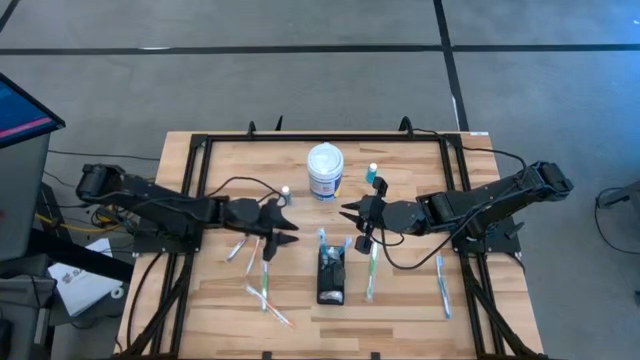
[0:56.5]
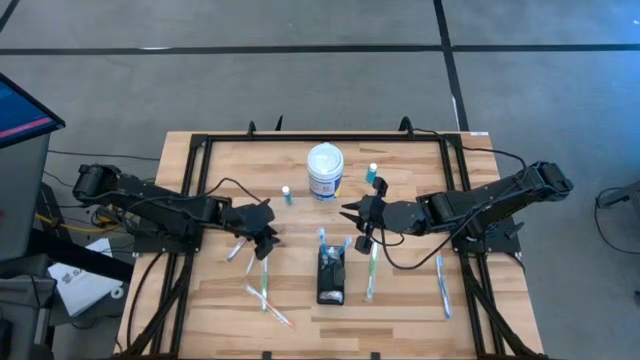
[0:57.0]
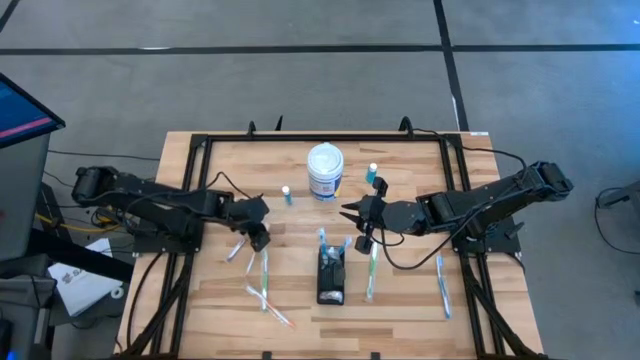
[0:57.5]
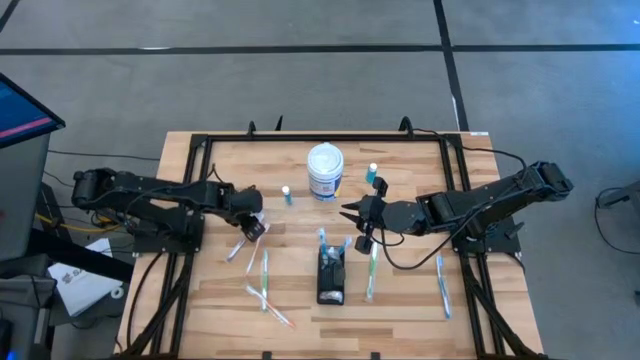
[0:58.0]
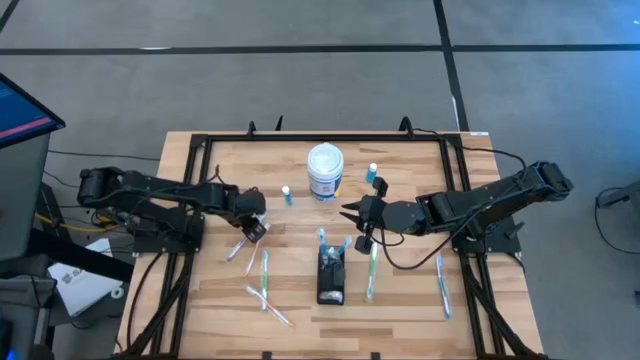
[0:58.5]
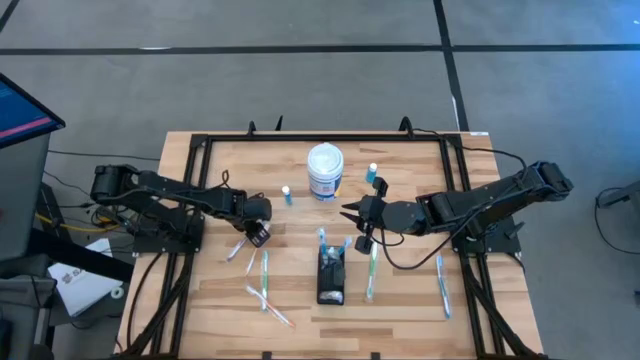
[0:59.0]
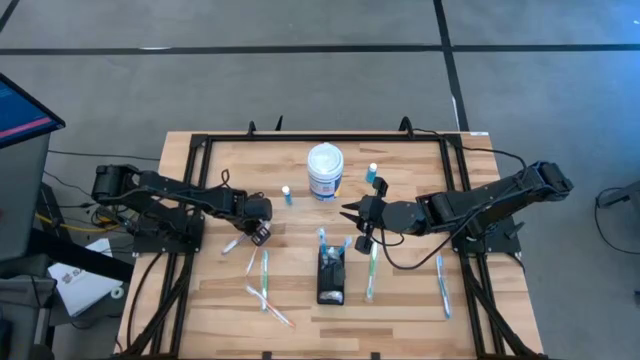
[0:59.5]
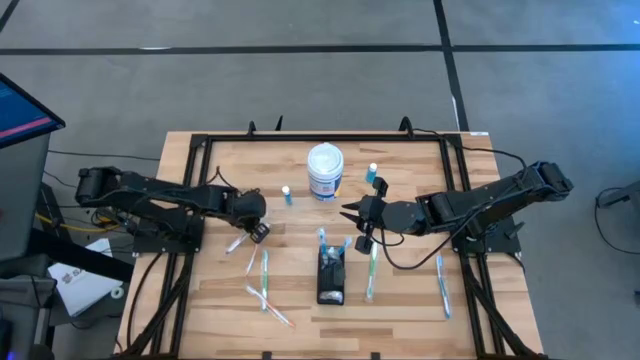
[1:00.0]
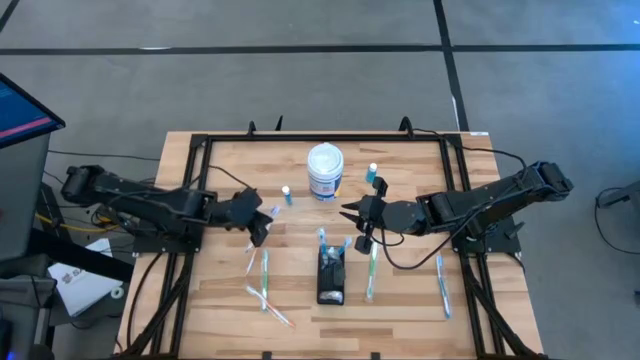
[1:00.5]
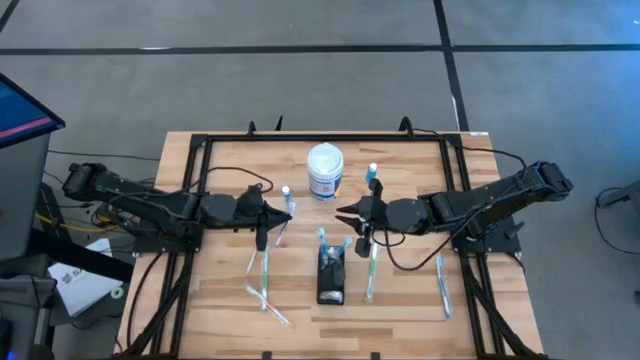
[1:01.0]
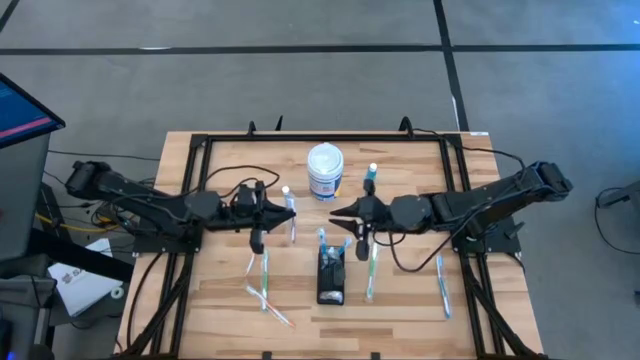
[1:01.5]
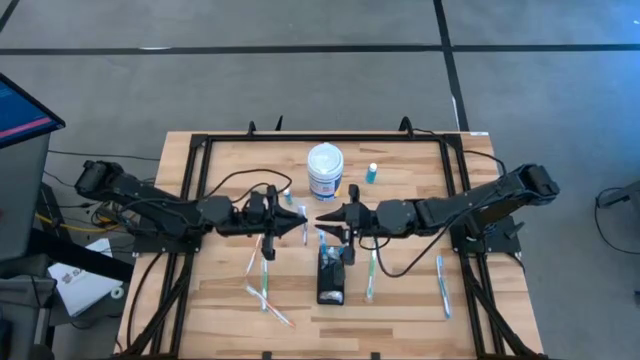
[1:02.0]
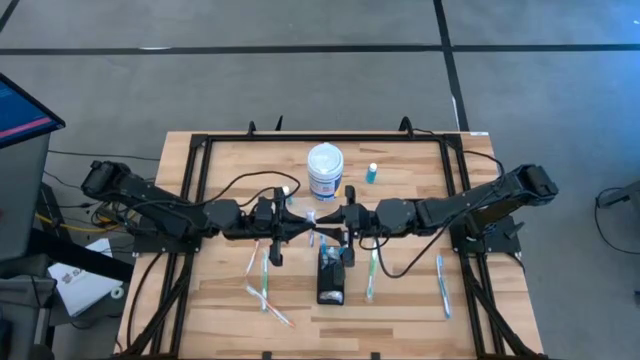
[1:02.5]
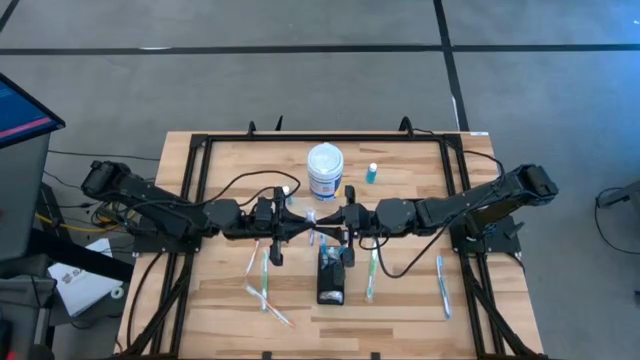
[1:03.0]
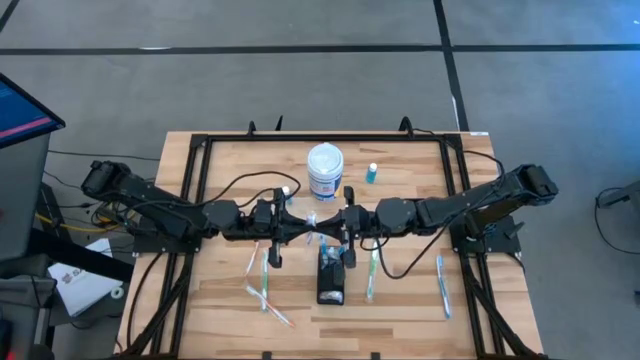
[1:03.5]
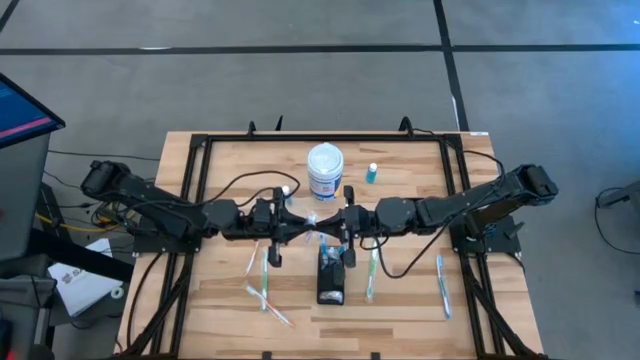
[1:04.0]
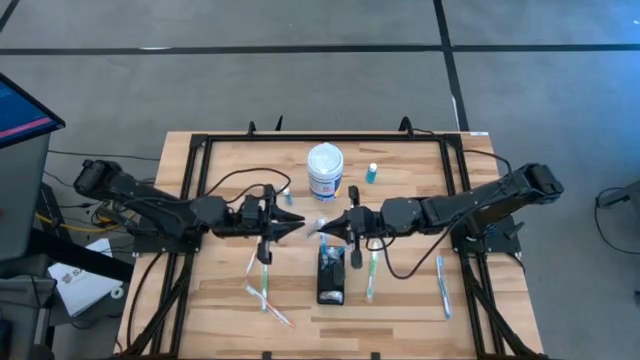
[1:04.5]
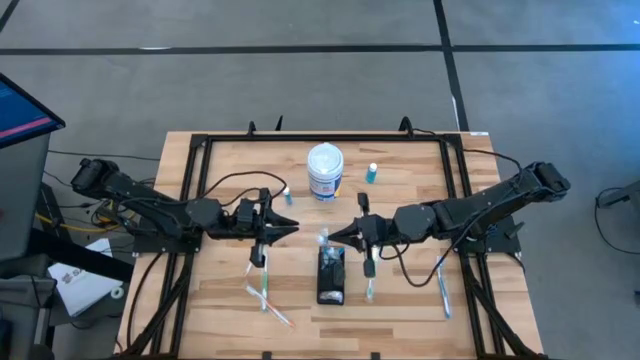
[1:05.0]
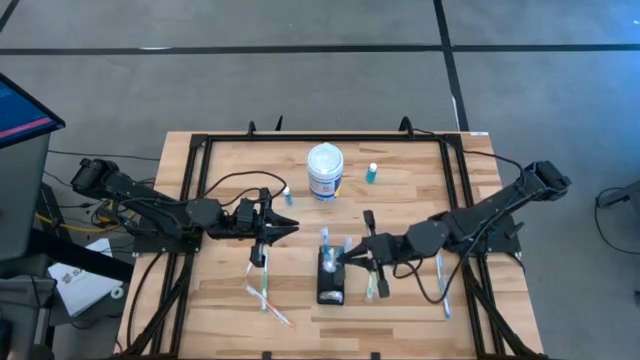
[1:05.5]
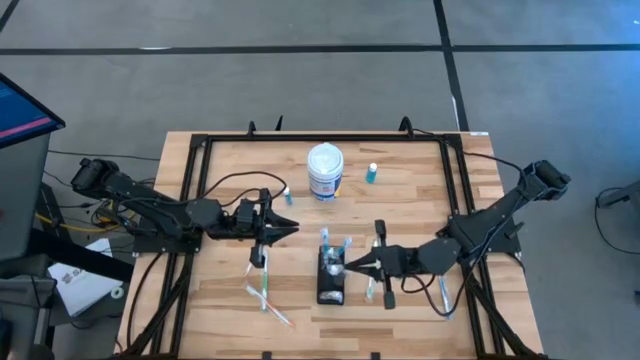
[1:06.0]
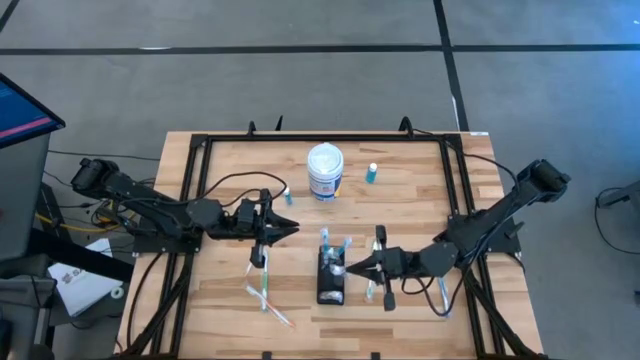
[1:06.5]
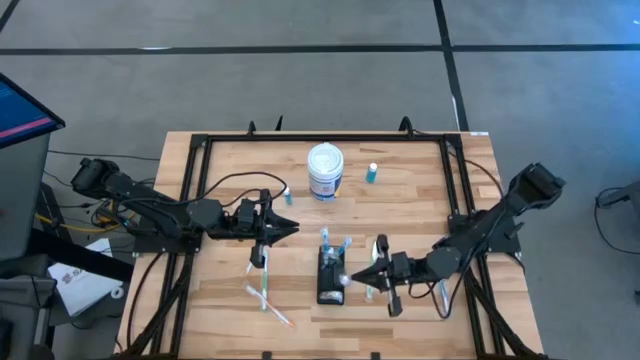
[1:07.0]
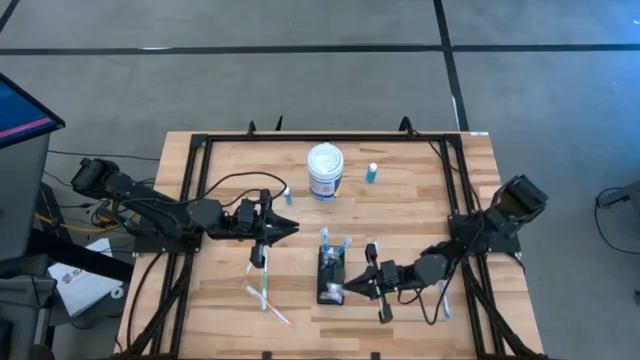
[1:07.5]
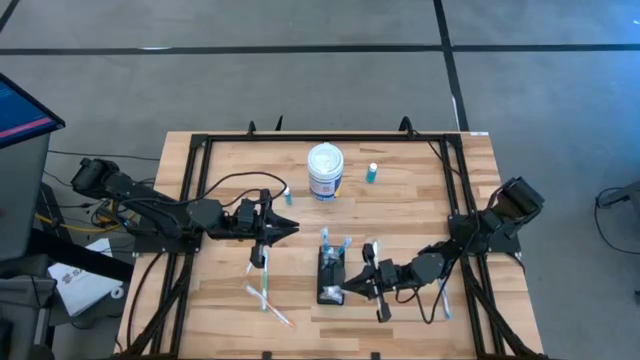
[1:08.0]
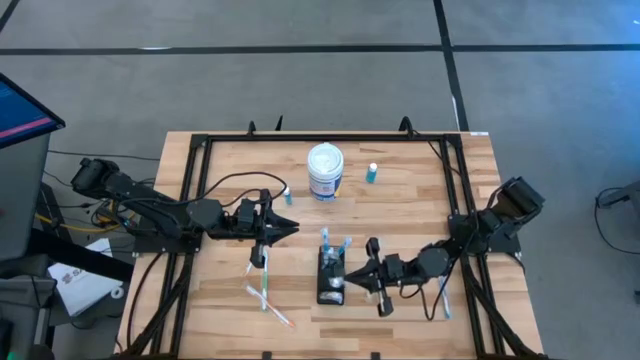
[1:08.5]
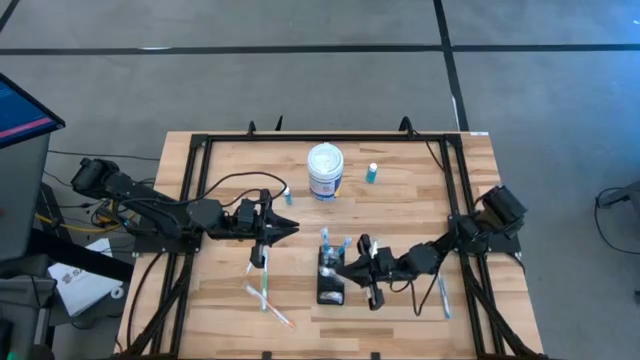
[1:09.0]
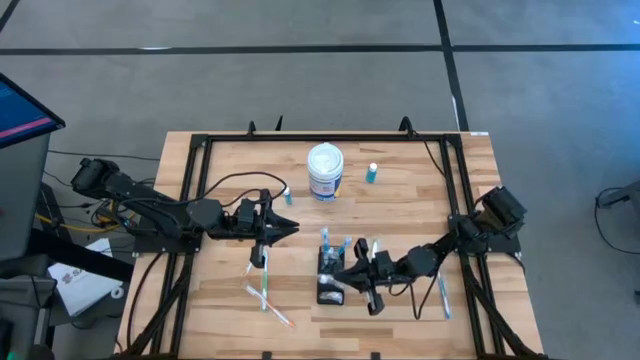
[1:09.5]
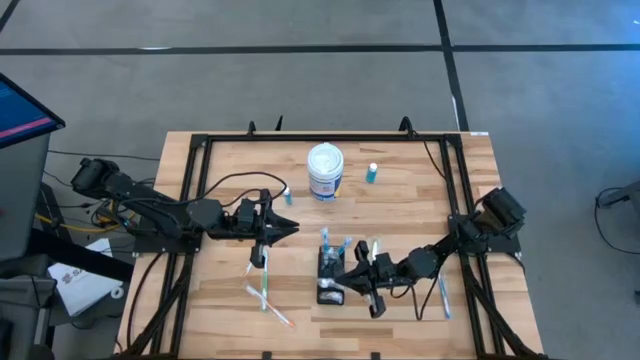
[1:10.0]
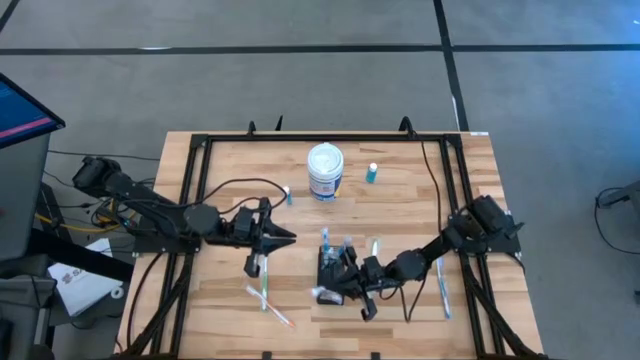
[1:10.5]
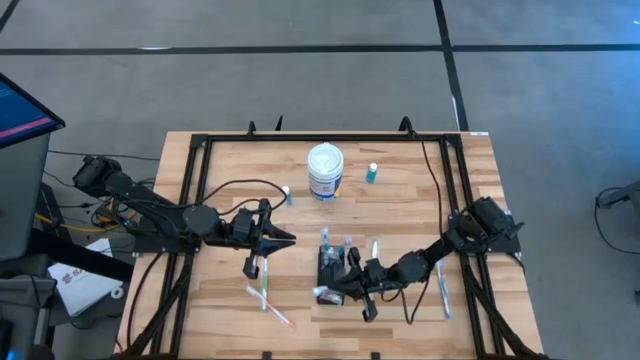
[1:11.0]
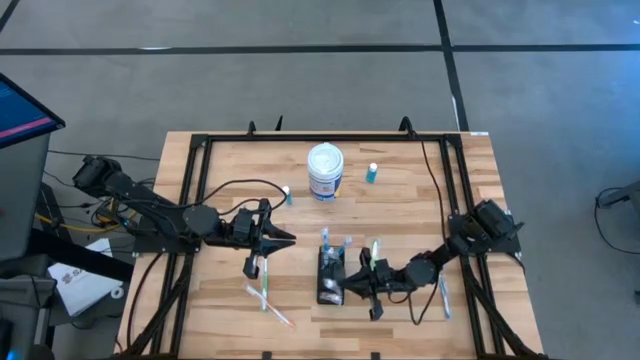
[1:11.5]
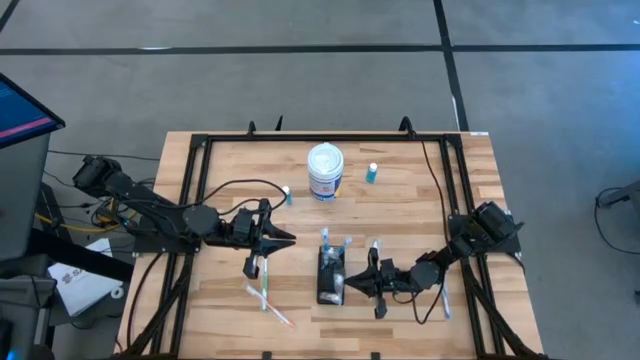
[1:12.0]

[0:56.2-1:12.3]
Task: Pick & Place toothbrushing station
Put the violet toothbrush into the black mesh organizer

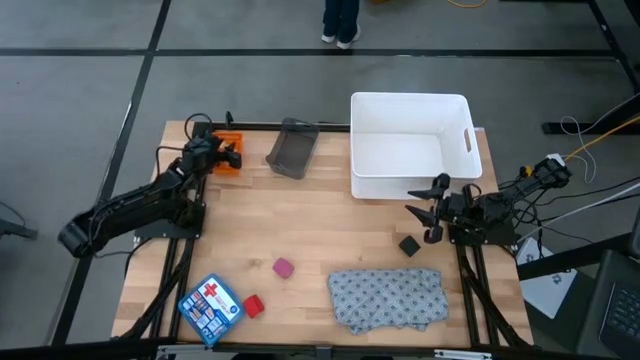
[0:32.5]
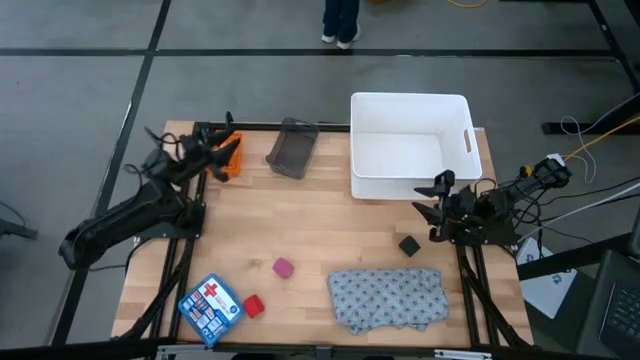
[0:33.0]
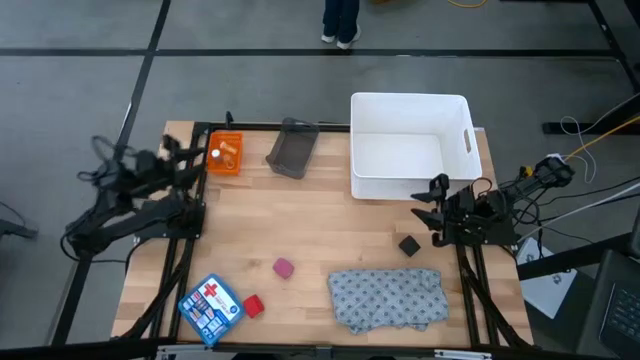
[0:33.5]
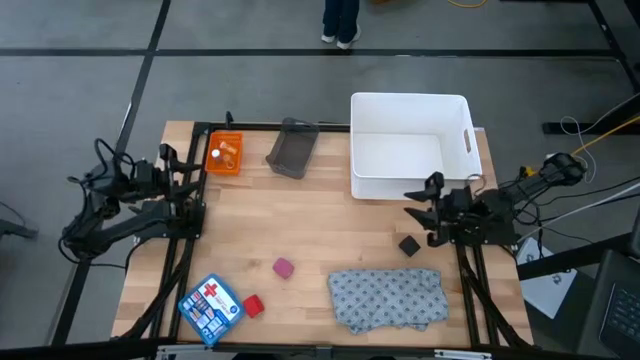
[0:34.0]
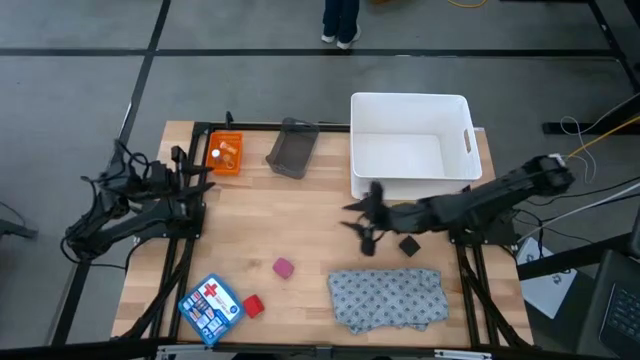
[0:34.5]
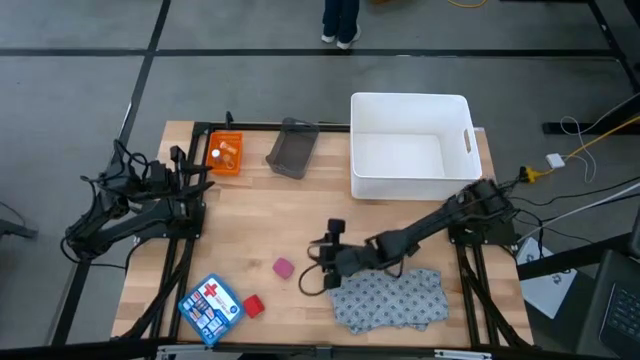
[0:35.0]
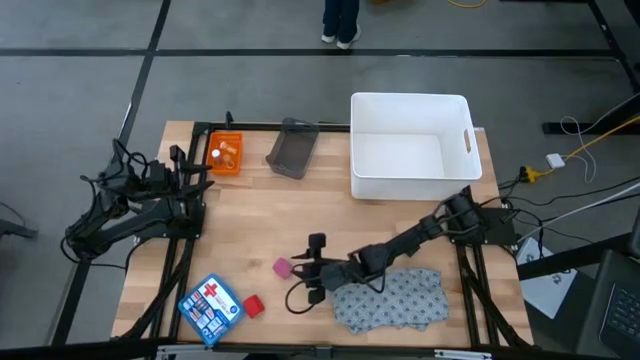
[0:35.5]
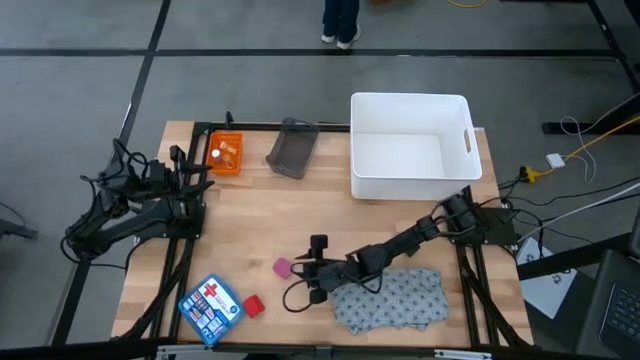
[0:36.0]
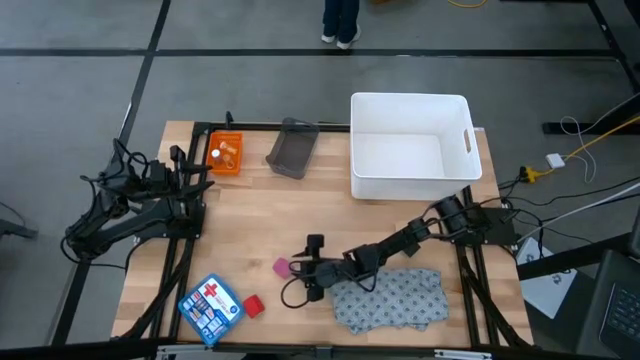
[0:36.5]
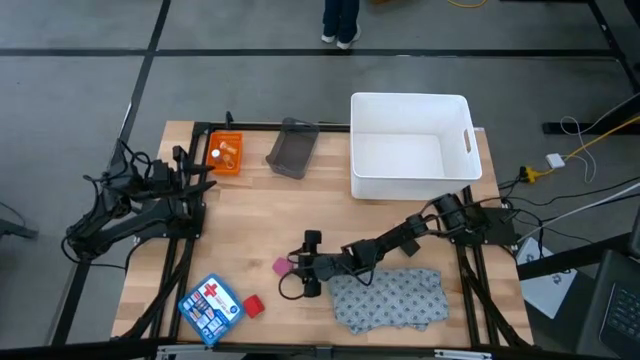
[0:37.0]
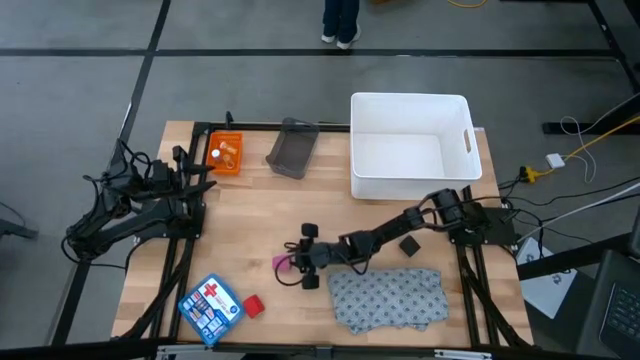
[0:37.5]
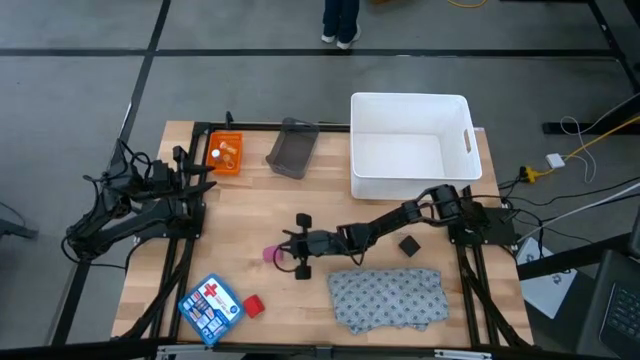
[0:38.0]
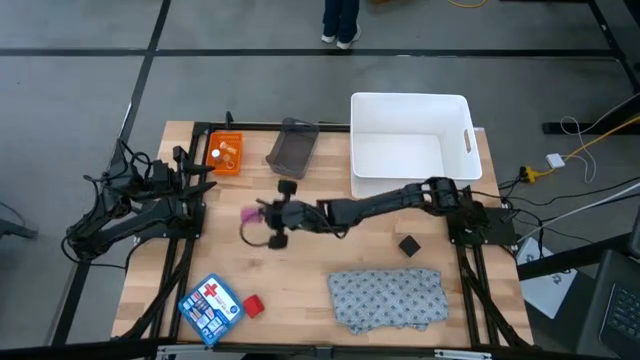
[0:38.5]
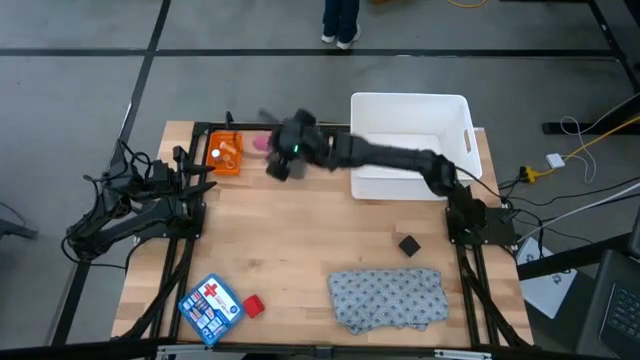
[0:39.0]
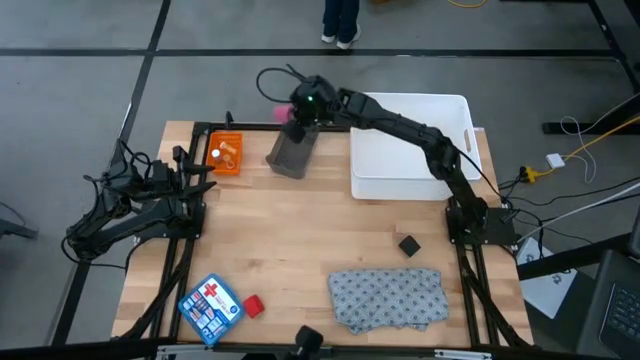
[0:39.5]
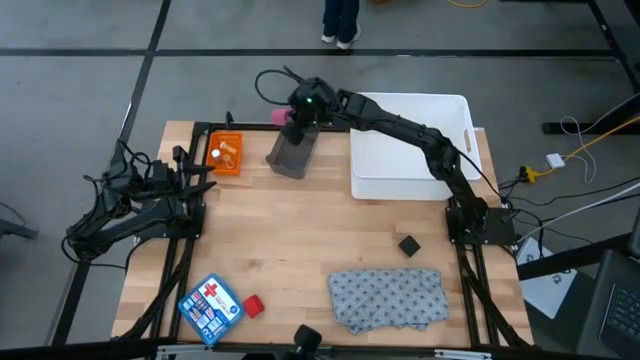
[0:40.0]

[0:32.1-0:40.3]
Task: Pick & place medical supplies in basket/bin
Put the pink bandage into the black bin
